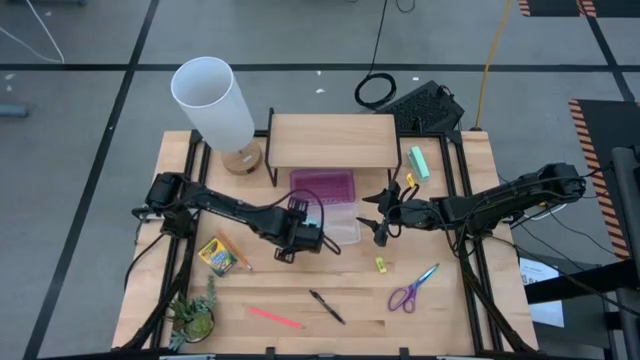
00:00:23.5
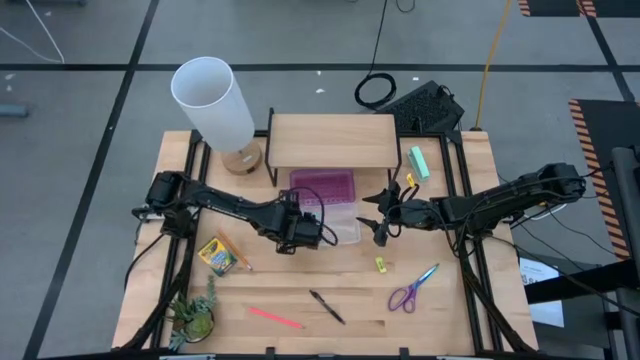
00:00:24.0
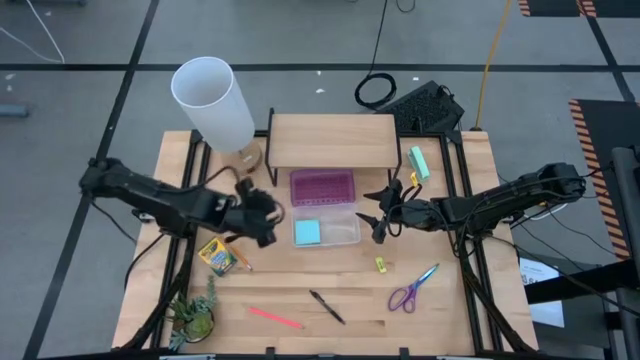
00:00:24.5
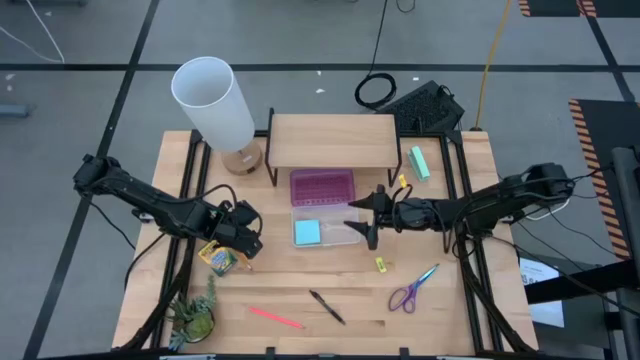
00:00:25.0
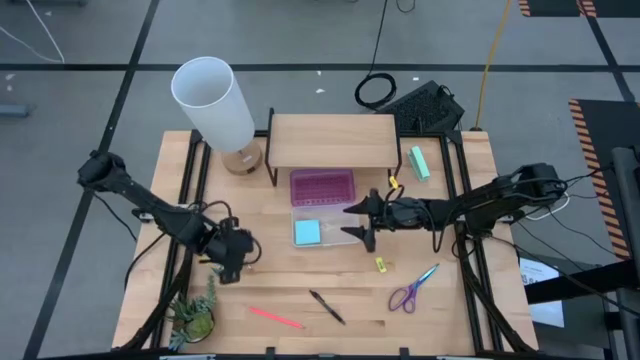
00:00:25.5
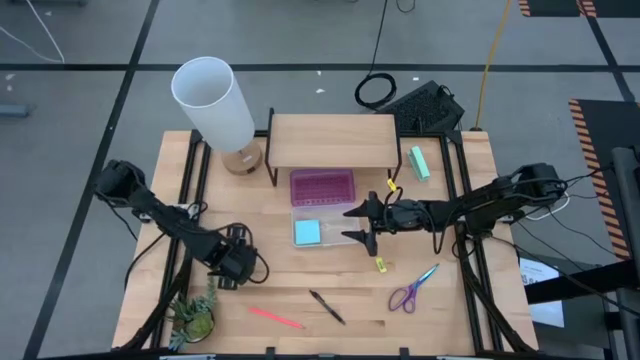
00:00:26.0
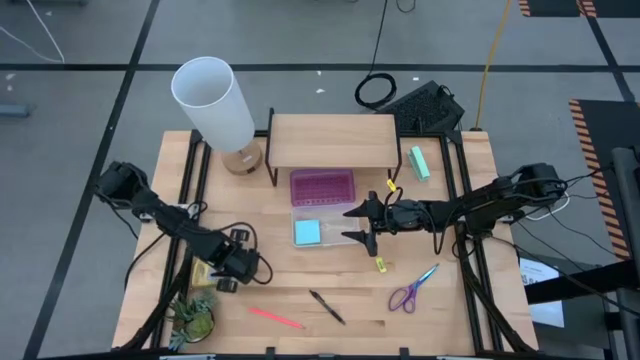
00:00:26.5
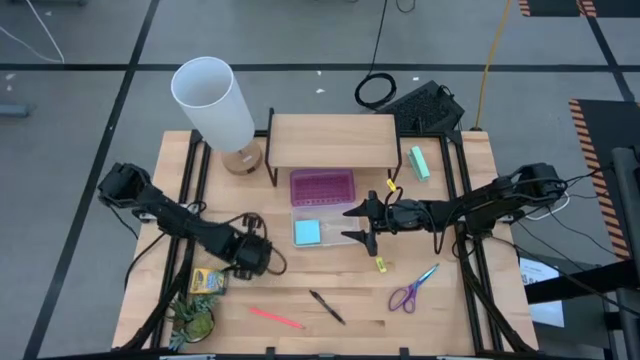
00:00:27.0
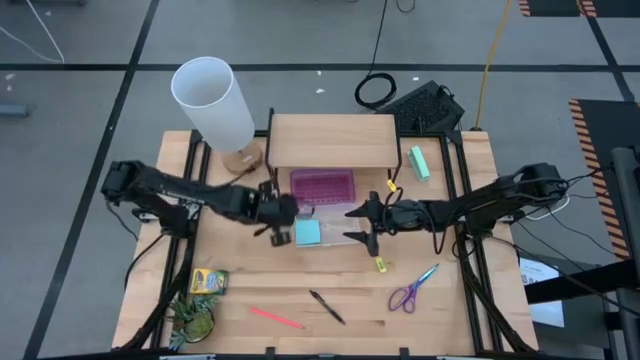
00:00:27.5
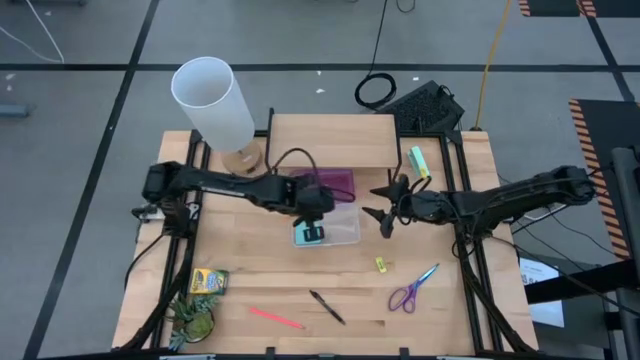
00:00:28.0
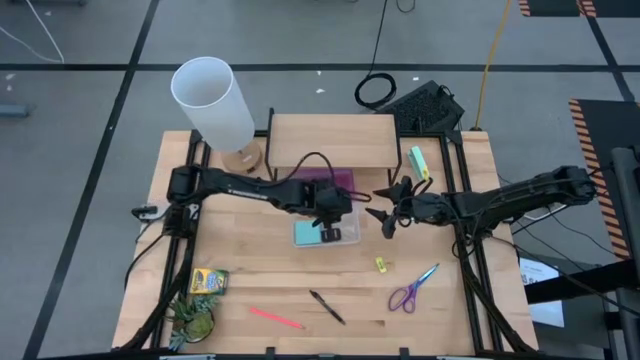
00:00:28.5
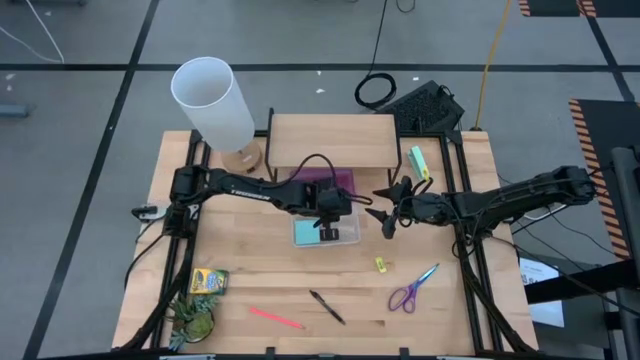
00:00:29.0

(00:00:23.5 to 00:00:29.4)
Task: Pack school essentials
Put the orange pencil into the violet supply box

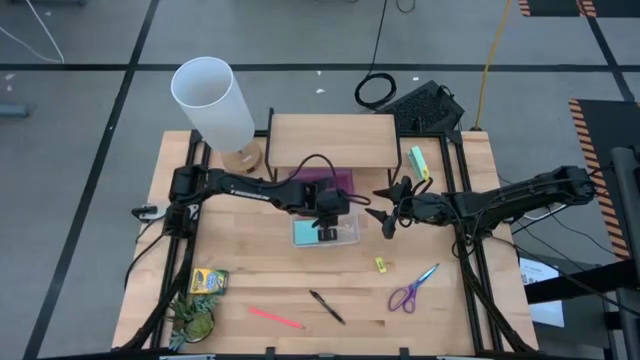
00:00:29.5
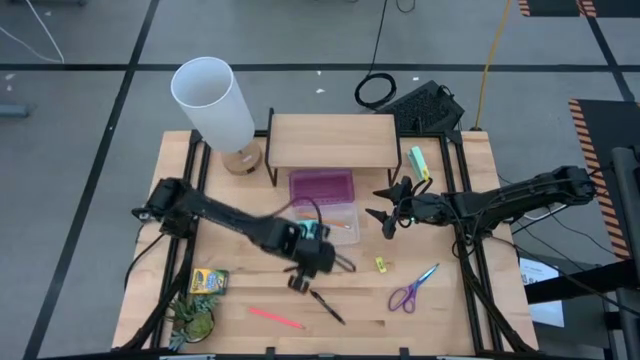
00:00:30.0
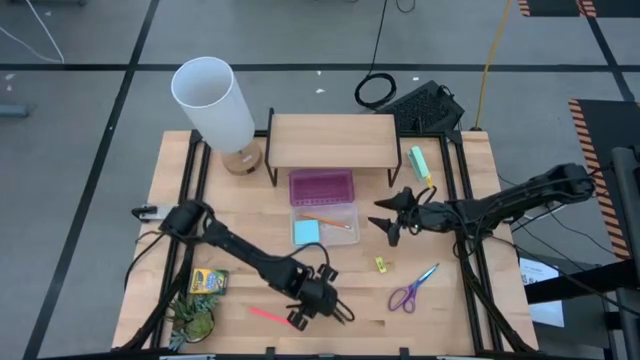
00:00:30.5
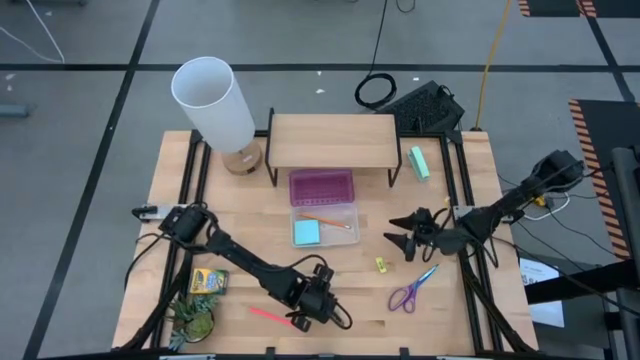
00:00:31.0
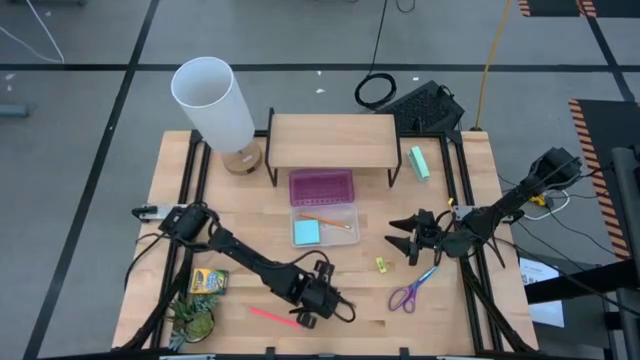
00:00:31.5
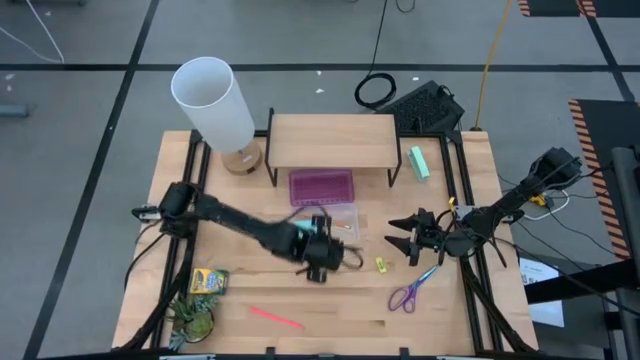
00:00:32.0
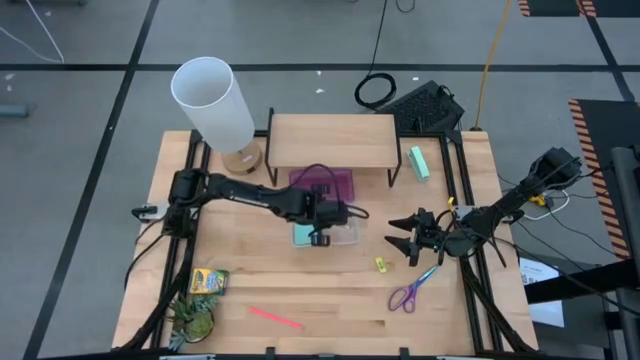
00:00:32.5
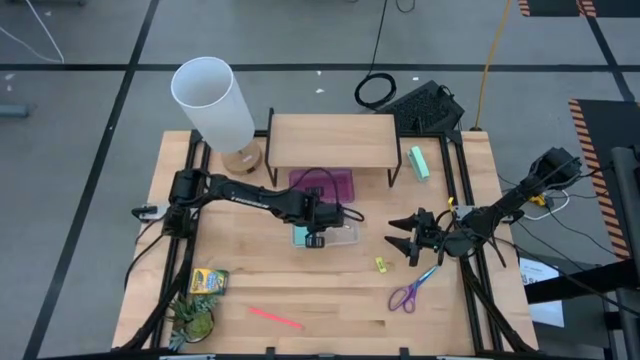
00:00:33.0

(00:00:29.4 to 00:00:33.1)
Put the black pen into the violet supply box

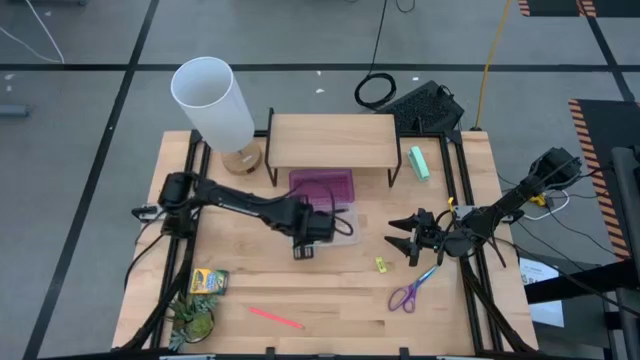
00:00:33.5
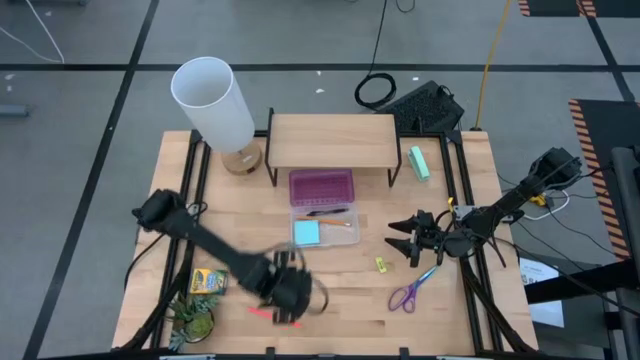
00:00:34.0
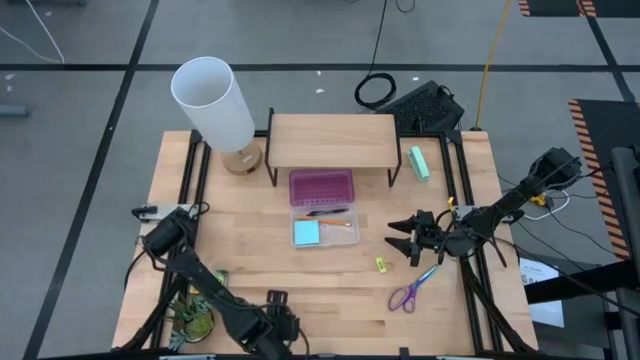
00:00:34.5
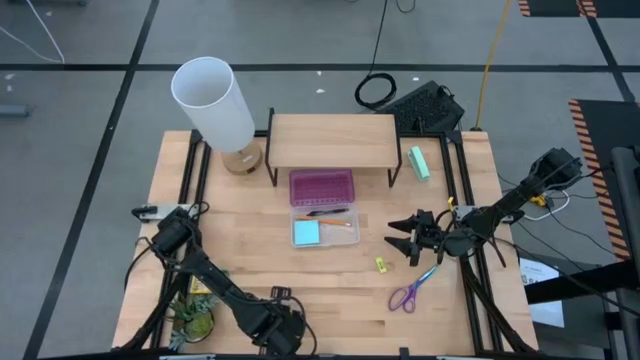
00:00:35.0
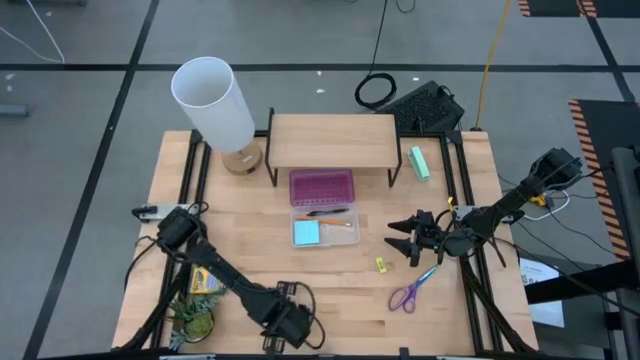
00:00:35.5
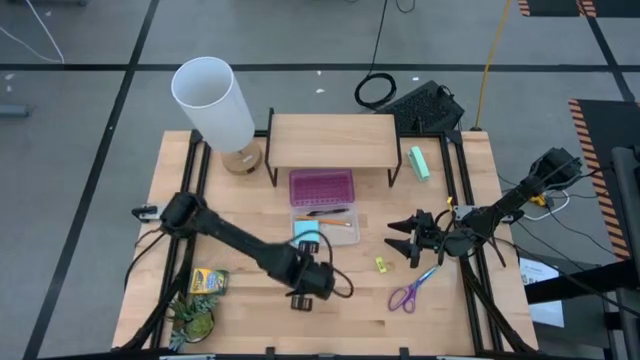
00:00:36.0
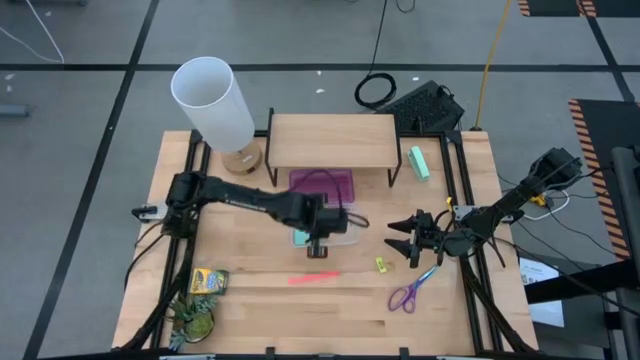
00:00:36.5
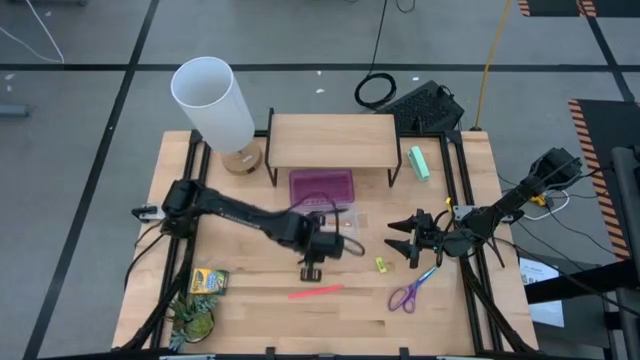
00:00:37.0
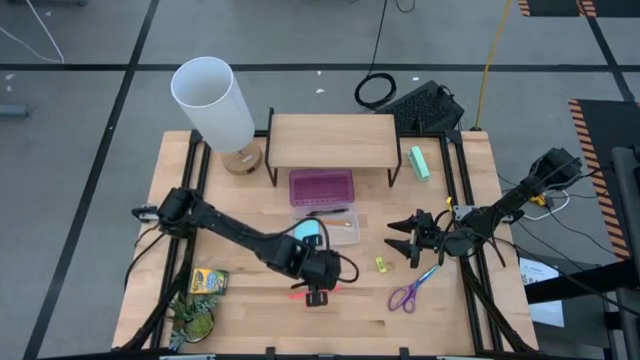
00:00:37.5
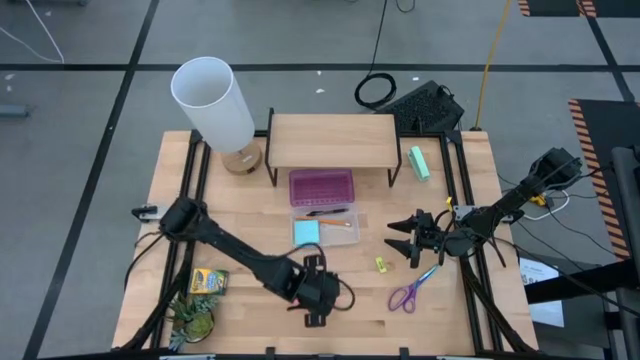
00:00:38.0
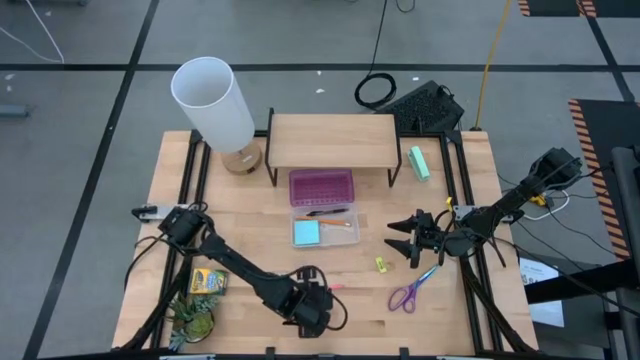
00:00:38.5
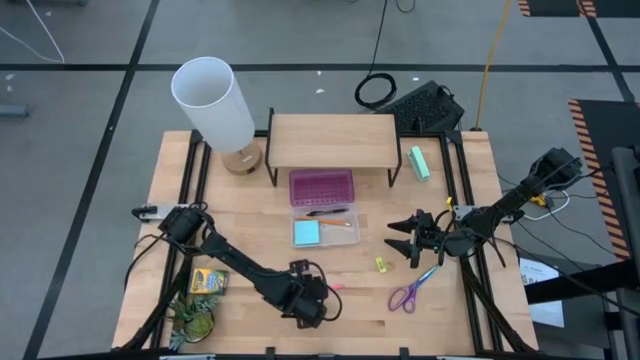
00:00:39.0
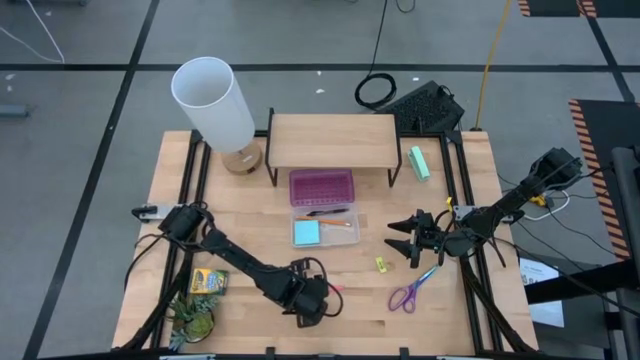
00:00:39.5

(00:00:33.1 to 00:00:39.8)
Put the pink pencil into the violet supply box

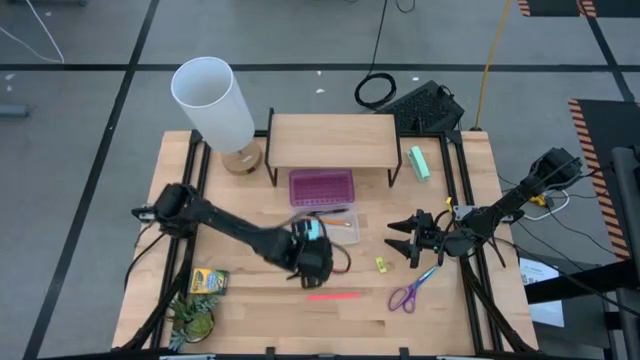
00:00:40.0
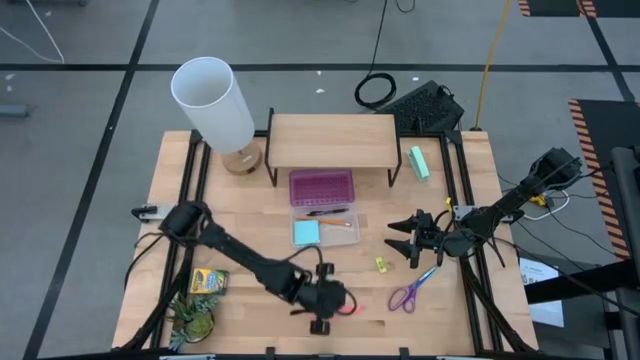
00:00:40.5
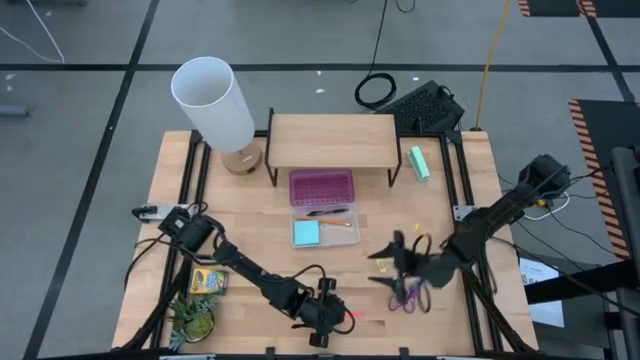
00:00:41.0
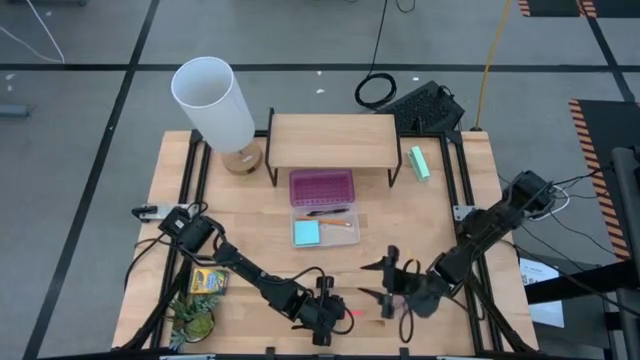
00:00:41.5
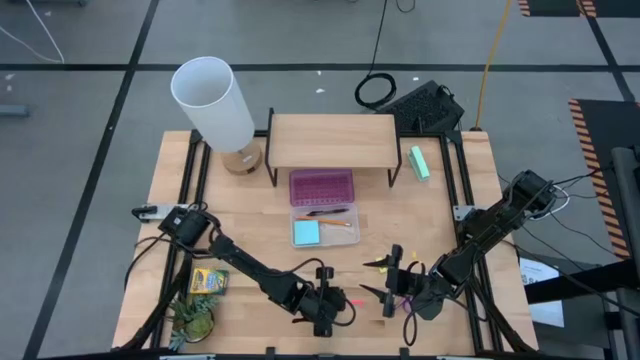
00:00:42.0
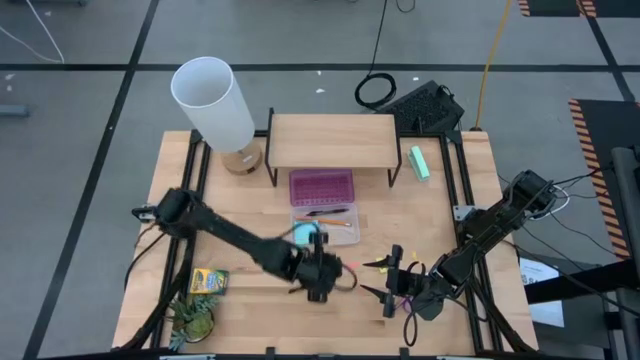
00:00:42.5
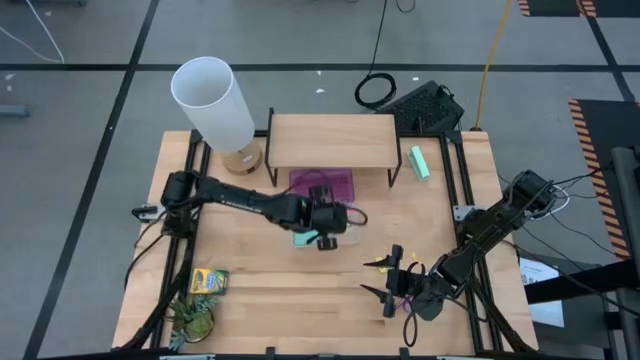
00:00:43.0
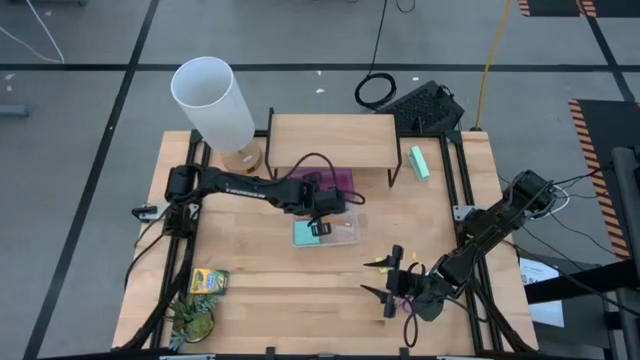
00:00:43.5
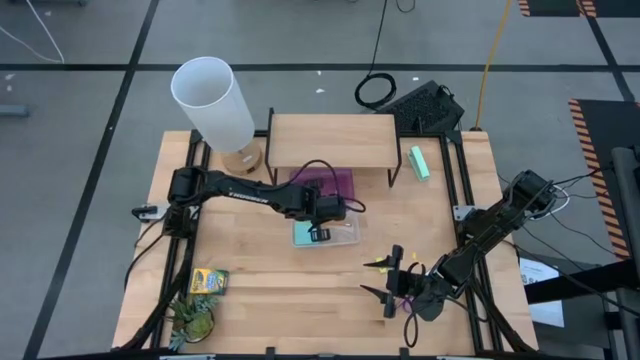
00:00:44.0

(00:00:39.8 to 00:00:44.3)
Put the pink pencil into the violet supply box
